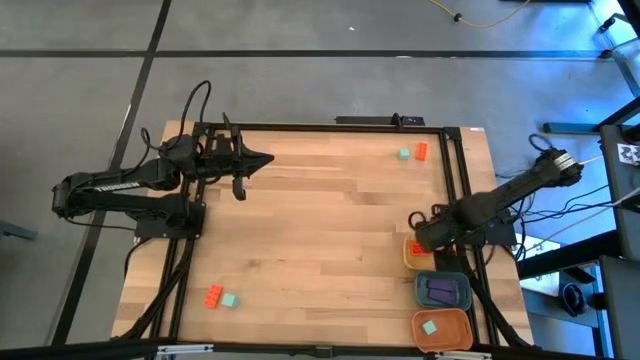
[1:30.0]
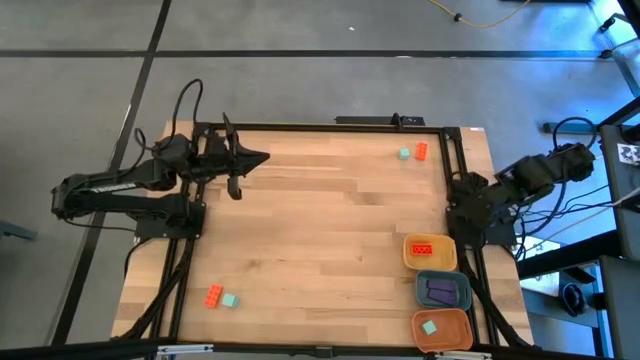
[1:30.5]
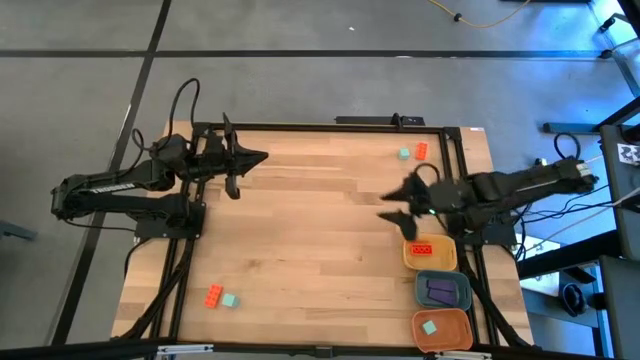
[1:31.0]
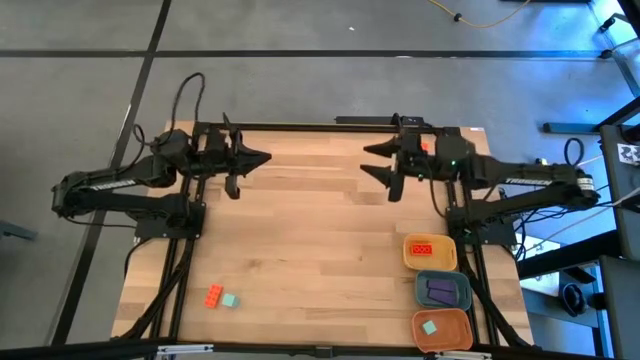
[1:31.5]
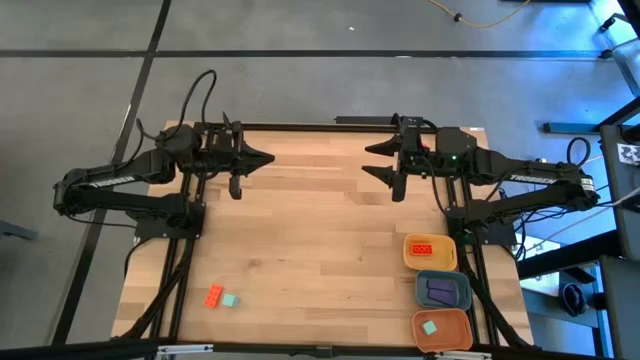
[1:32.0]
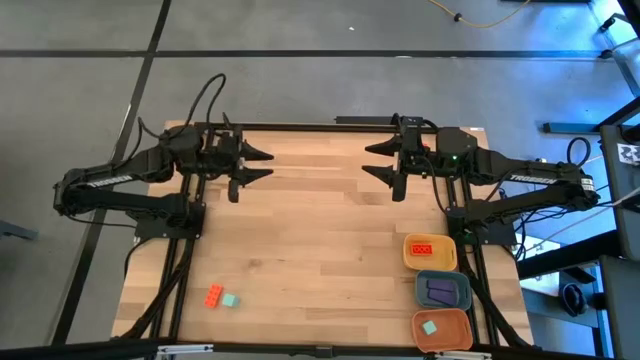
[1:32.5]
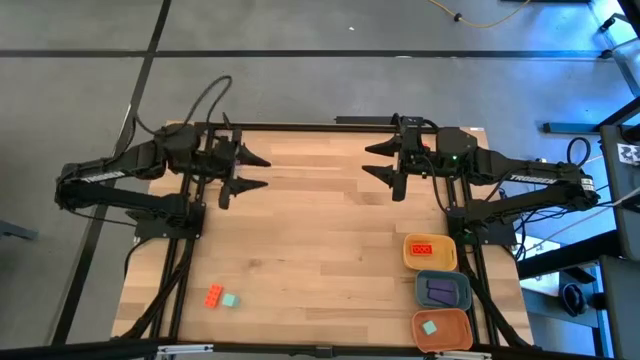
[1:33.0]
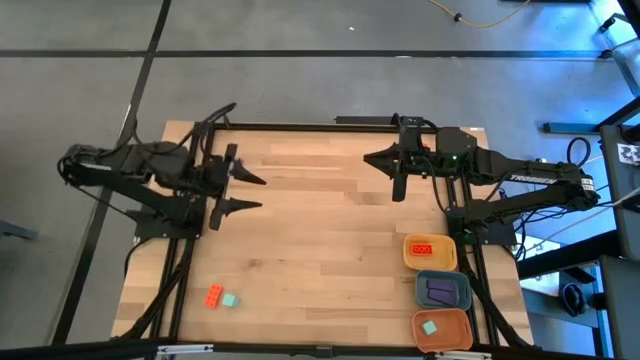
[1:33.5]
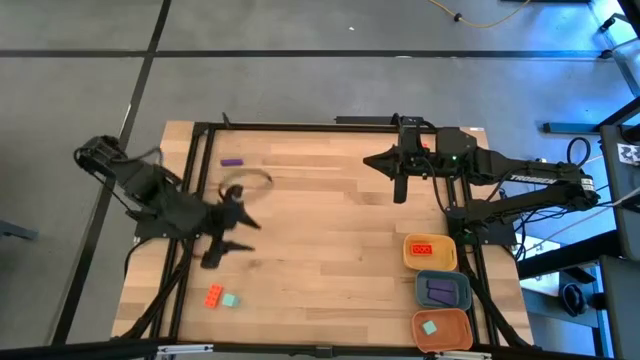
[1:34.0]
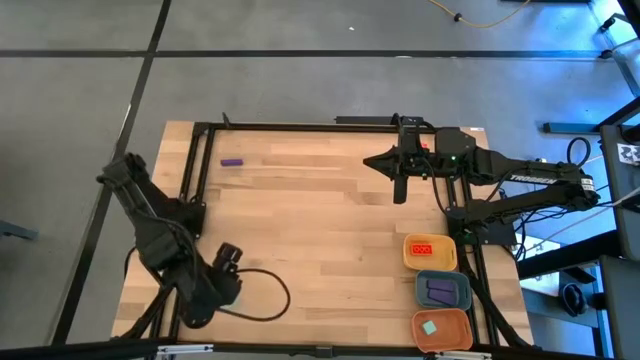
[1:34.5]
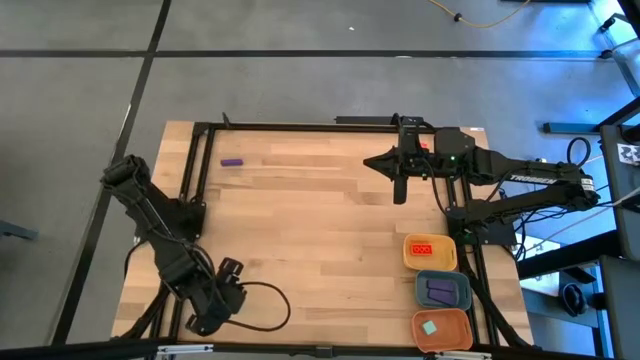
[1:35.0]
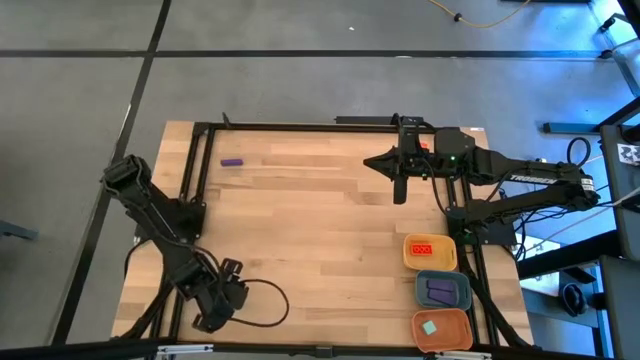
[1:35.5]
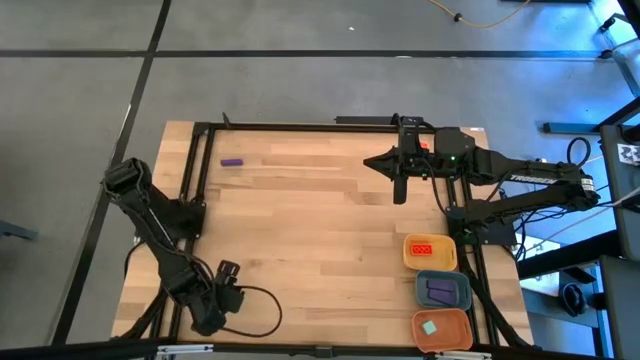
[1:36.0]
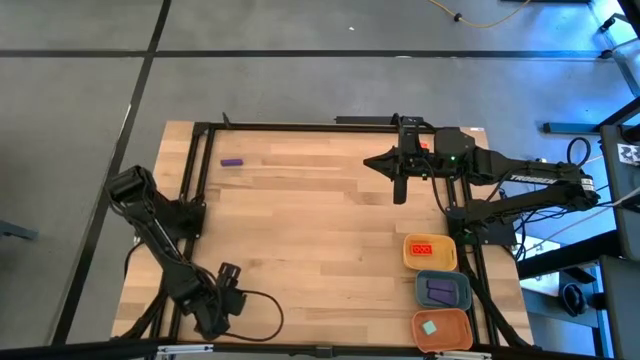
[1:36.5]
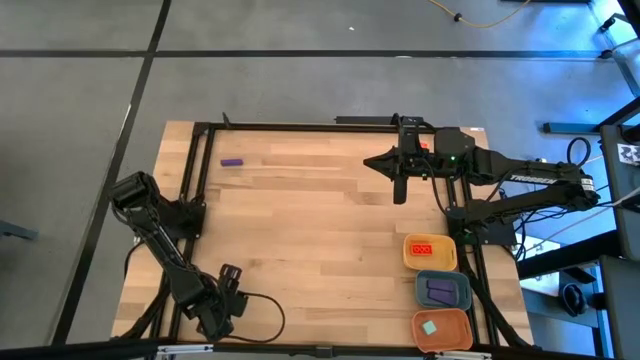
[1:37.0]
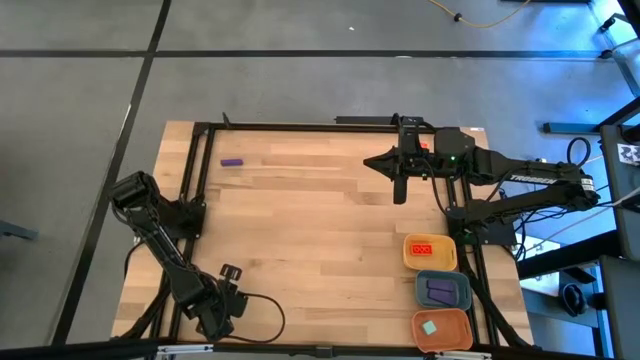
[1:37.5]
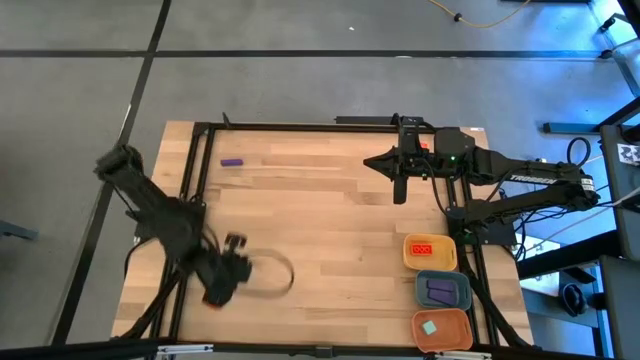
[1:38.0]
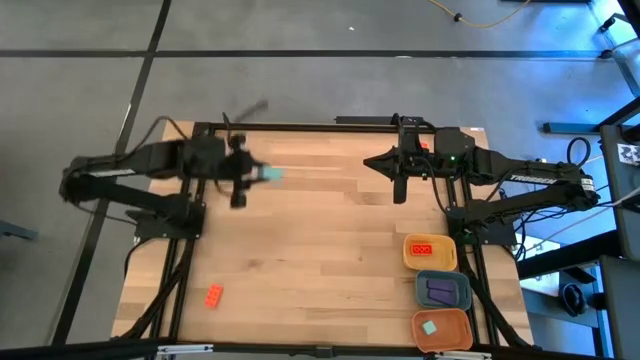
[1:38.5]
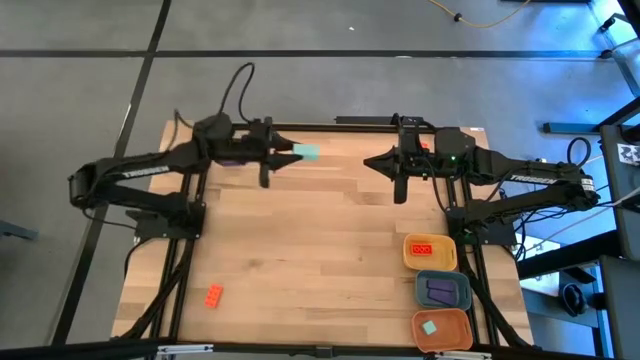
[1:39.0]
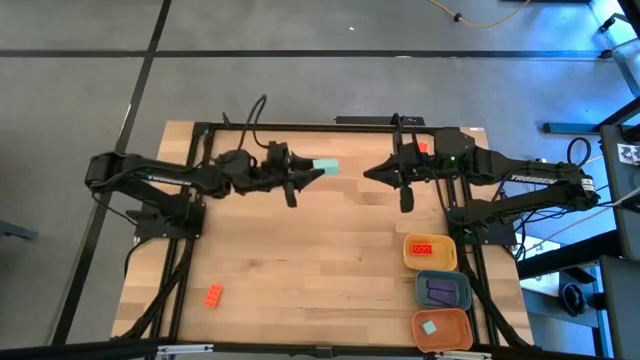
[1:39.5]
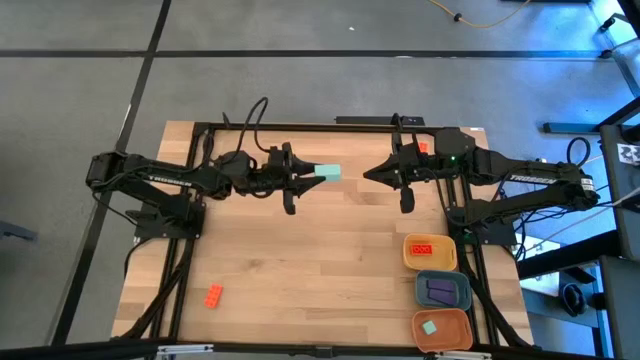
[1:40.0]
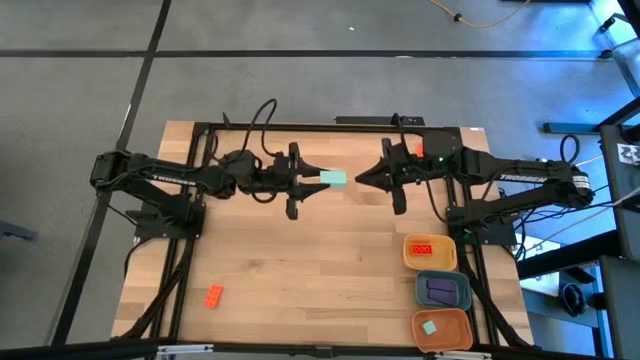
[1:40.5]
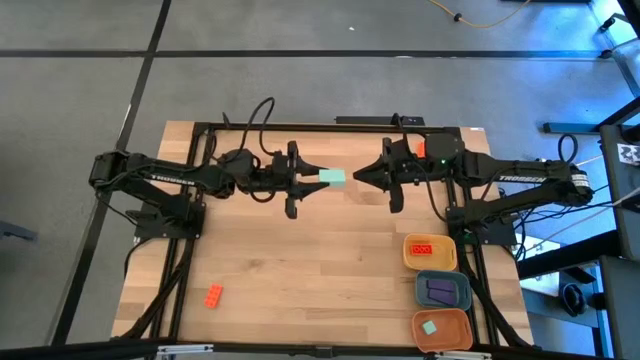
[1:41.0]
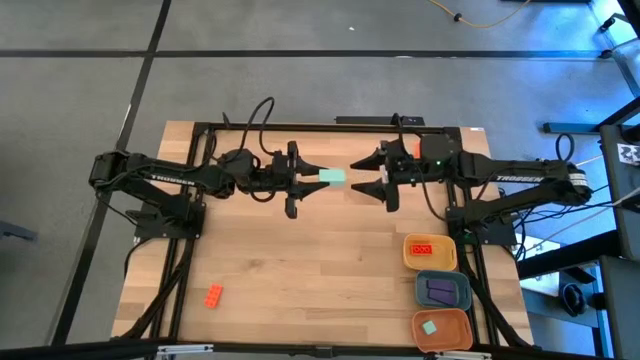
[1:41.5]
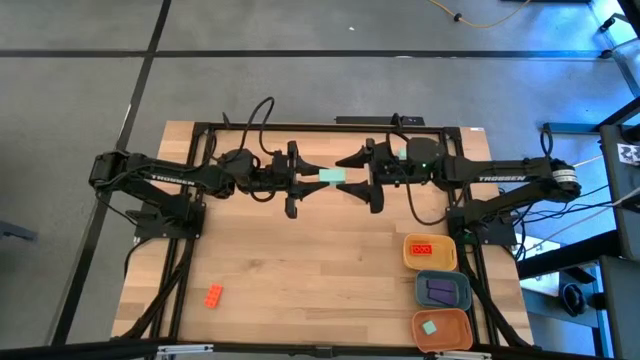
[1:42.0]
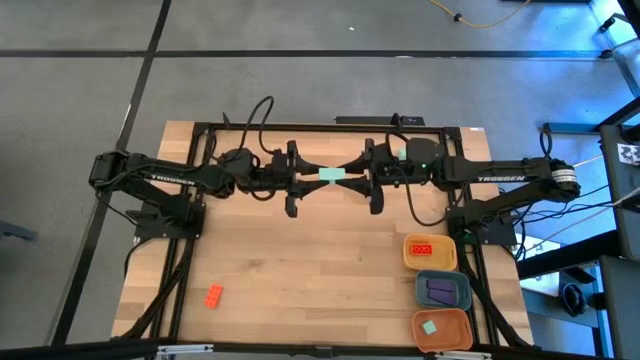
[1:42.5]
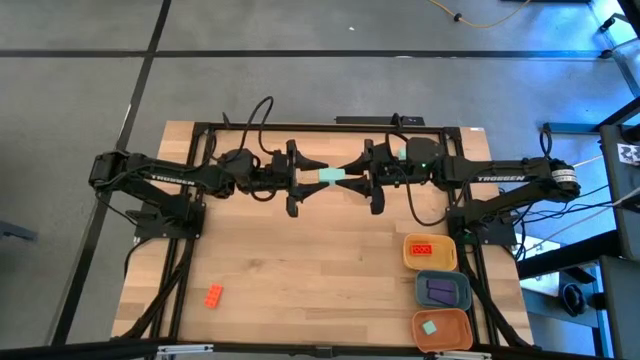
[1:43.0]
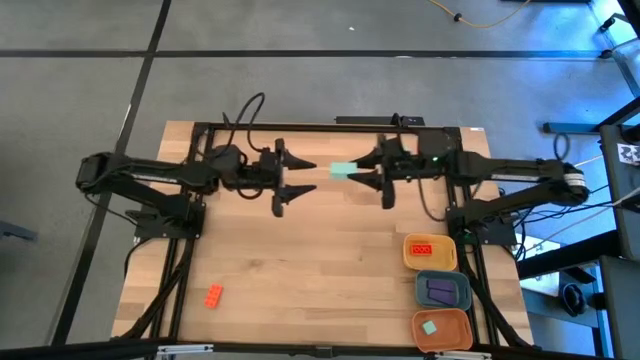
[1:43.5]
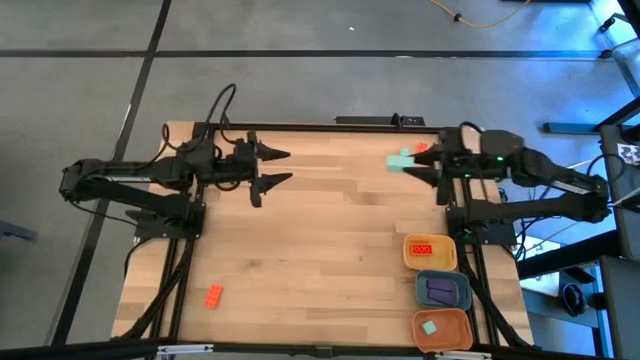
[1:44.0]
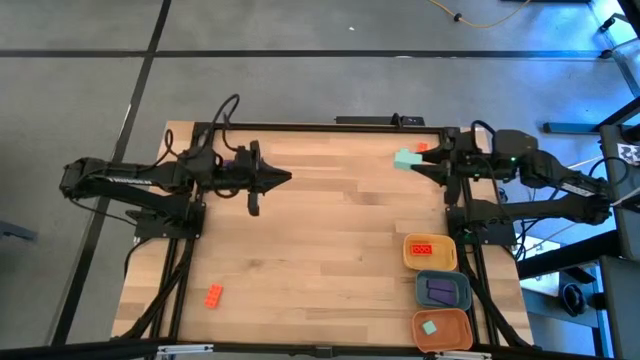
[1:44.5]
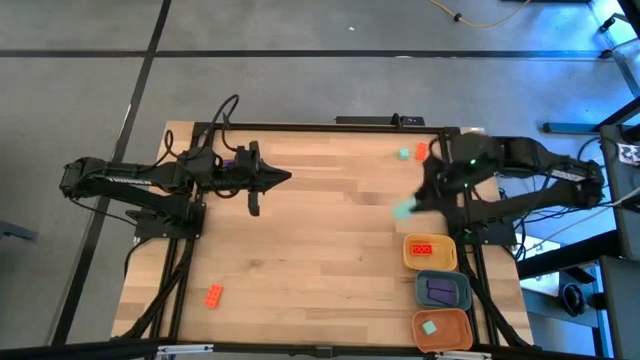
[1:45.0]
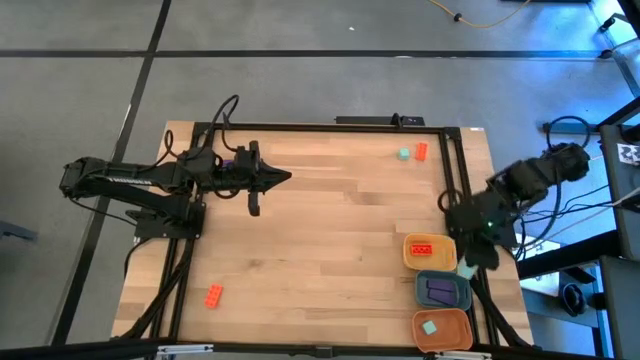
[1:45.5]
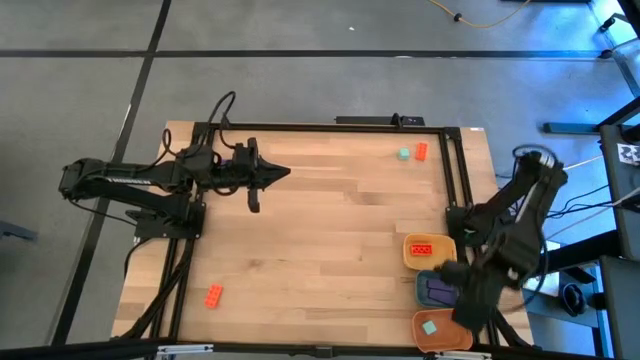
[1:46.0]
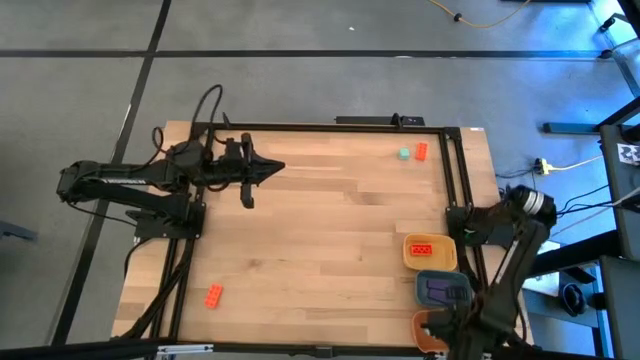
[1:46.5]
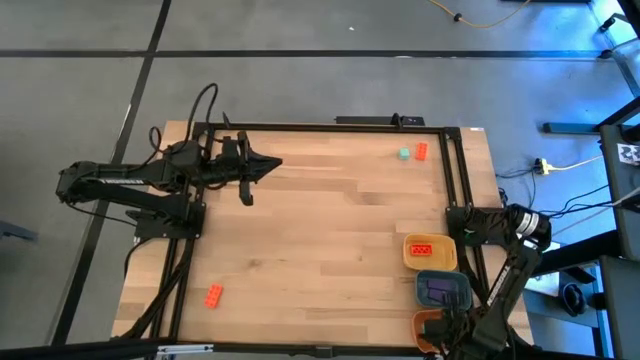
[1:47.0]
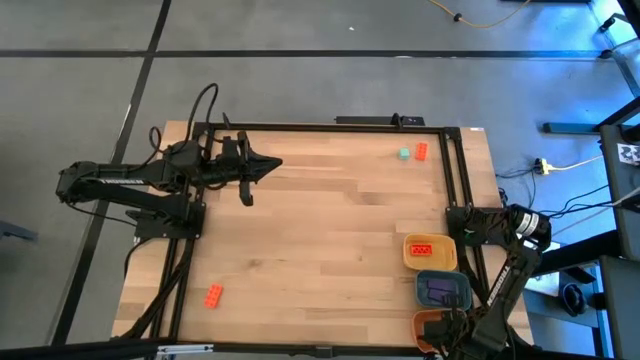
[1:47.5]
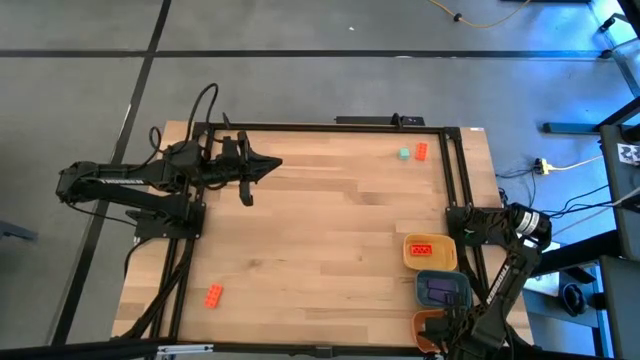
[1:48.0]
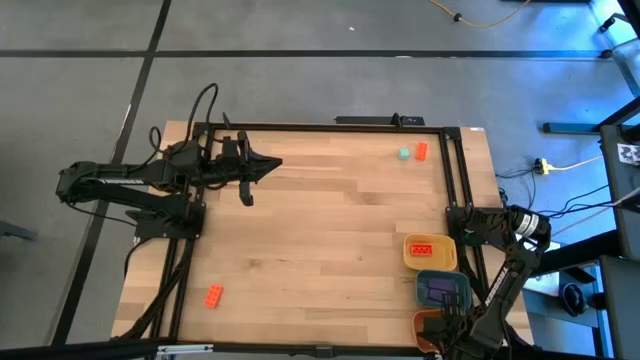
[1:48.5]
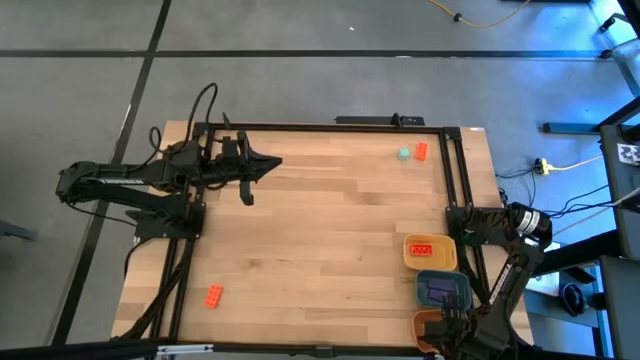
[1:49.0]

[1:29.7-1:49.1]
Task: Sort & place blocks by color
Put the bottom light blue block into the orange bin

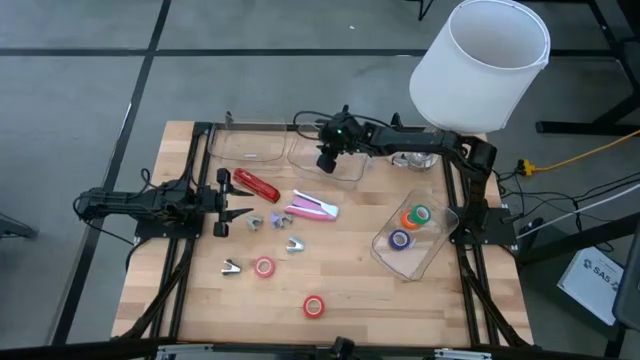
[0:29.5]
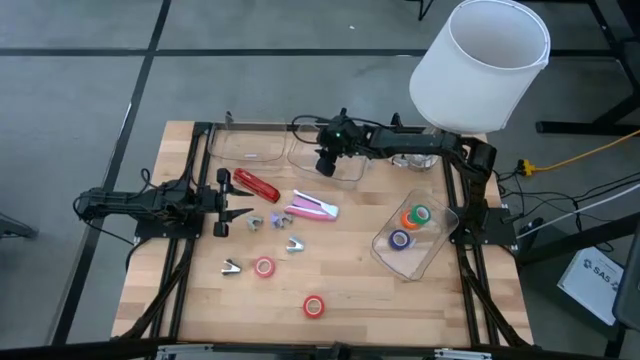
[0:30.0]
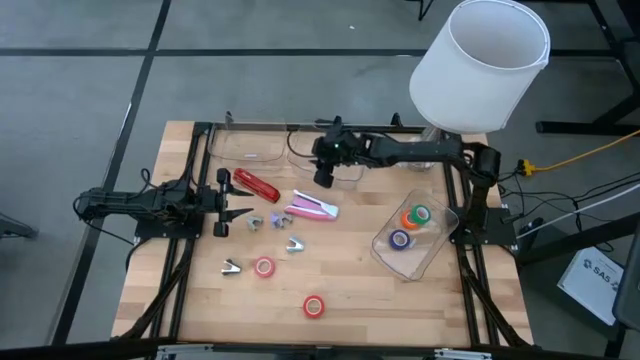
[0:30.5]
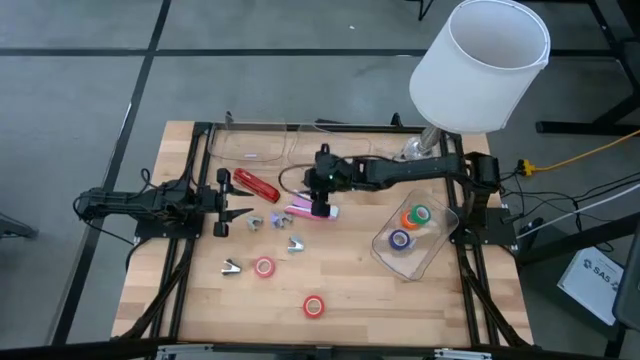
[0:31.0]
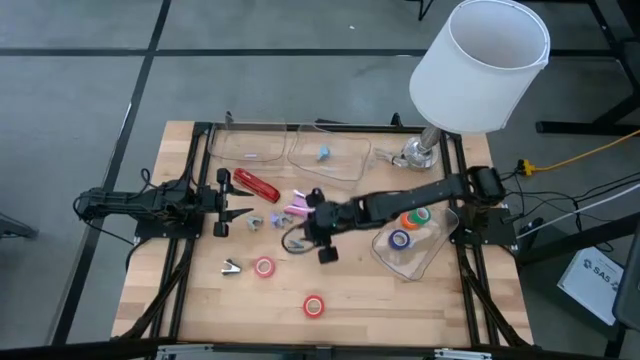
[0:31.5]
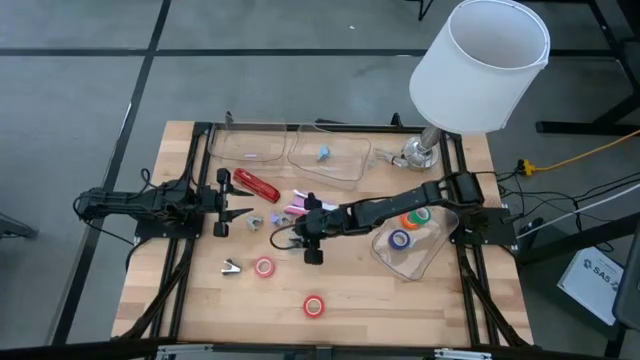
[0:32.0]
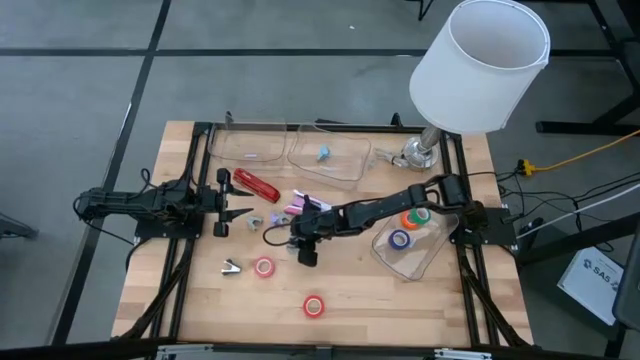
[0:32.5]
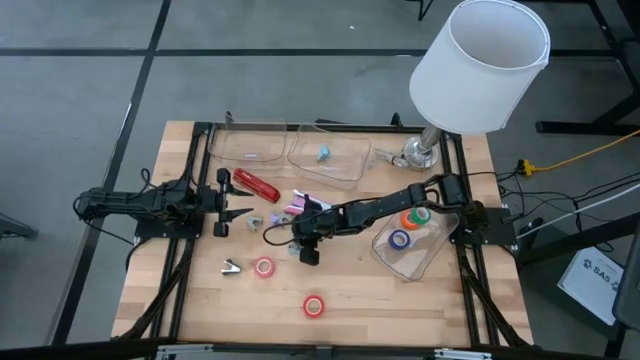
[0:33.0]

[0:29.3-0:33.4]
Task: Pick and place Stapler, Stapler remover, tape
Put the blue staple remover into the top right transparent bin
